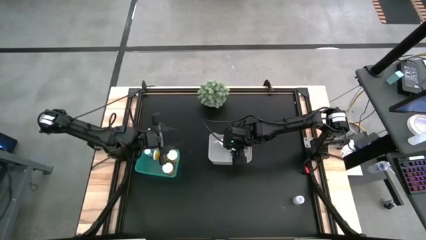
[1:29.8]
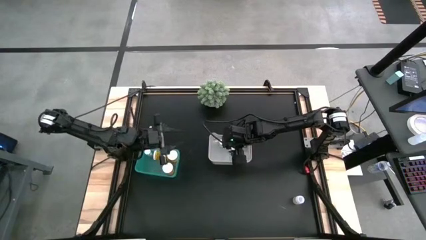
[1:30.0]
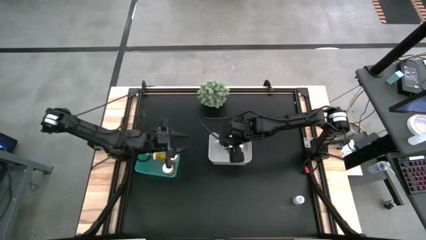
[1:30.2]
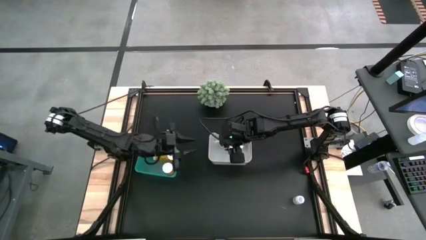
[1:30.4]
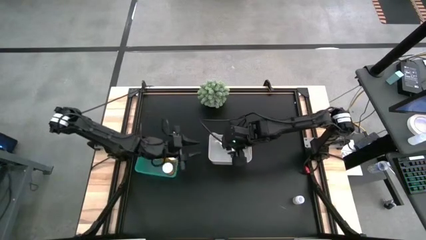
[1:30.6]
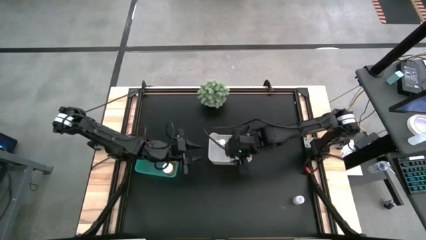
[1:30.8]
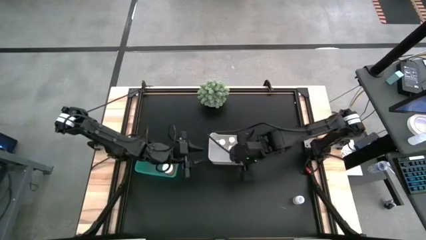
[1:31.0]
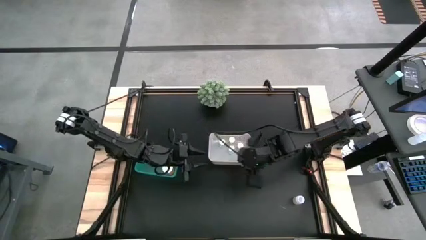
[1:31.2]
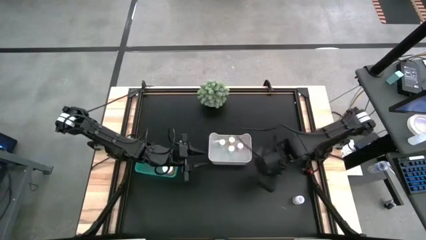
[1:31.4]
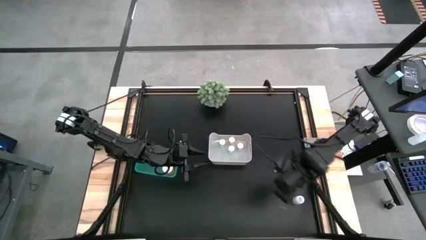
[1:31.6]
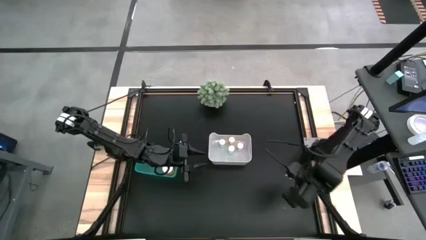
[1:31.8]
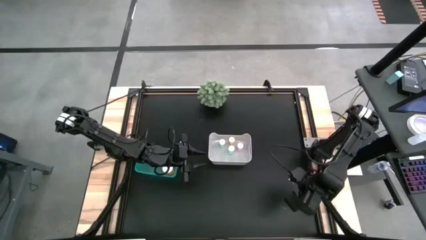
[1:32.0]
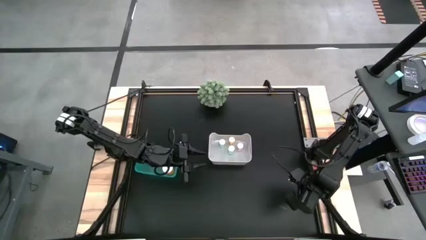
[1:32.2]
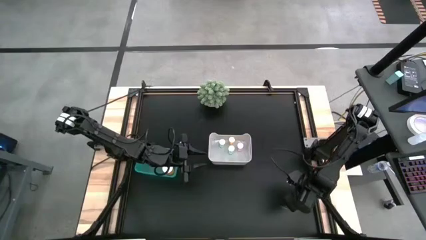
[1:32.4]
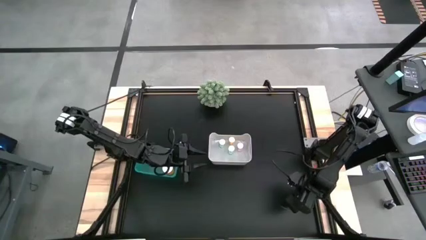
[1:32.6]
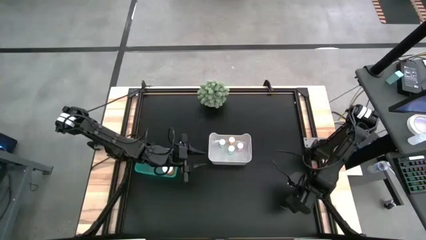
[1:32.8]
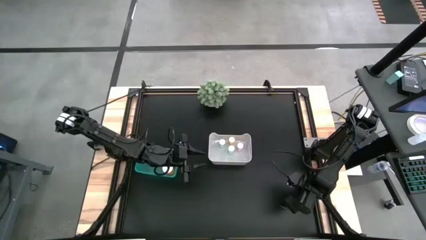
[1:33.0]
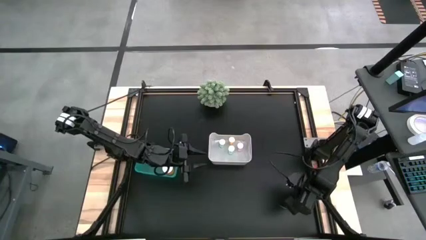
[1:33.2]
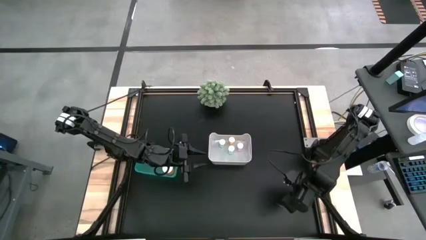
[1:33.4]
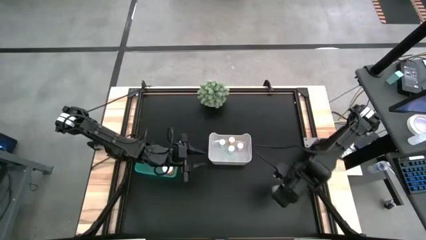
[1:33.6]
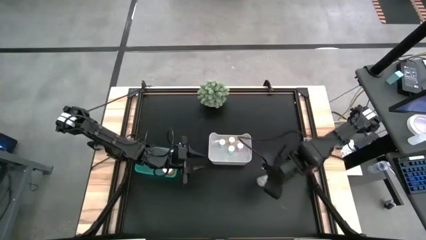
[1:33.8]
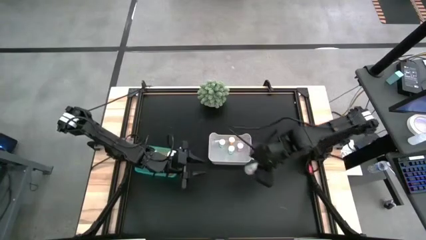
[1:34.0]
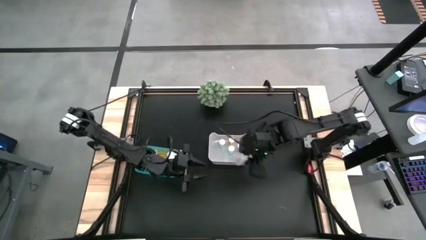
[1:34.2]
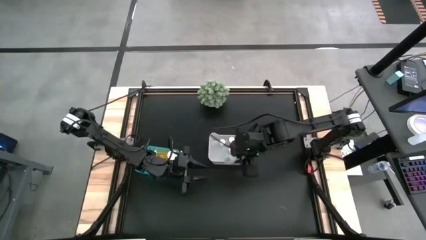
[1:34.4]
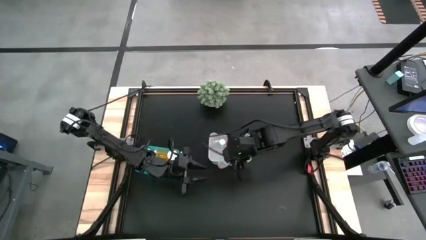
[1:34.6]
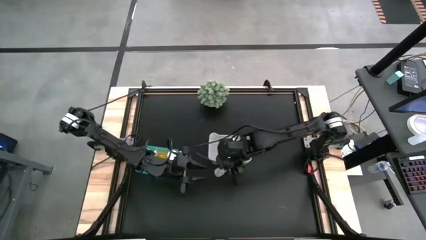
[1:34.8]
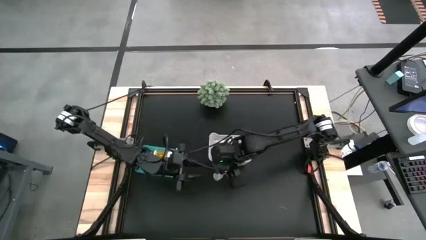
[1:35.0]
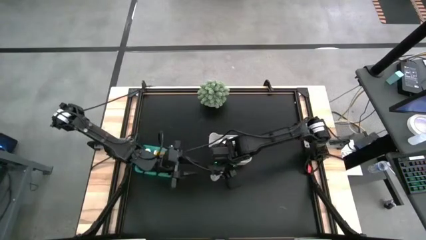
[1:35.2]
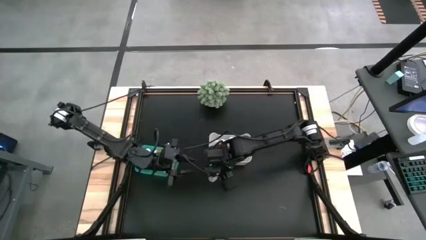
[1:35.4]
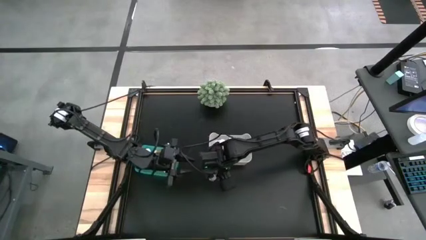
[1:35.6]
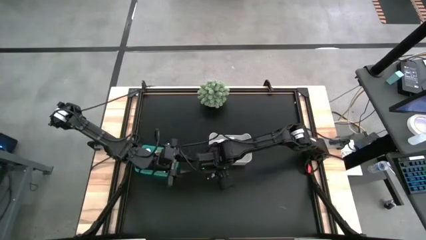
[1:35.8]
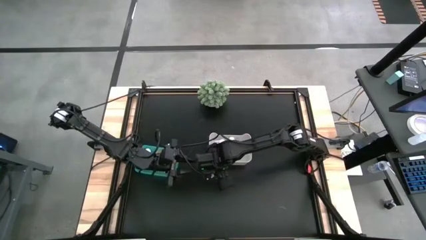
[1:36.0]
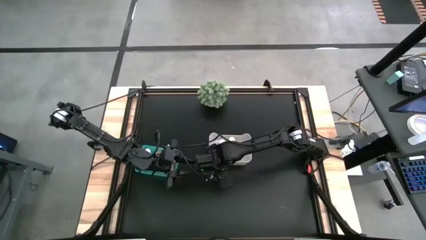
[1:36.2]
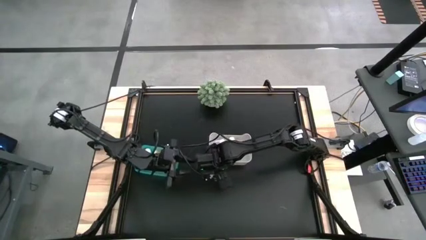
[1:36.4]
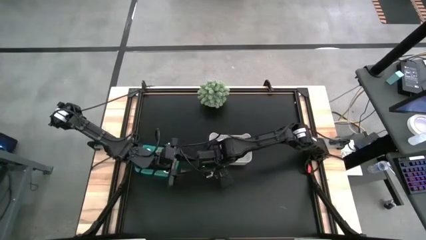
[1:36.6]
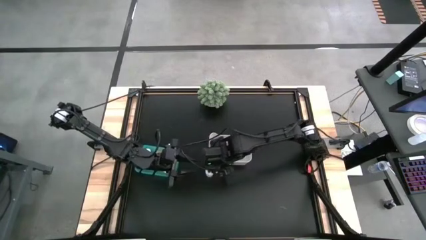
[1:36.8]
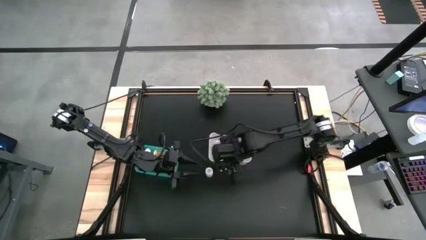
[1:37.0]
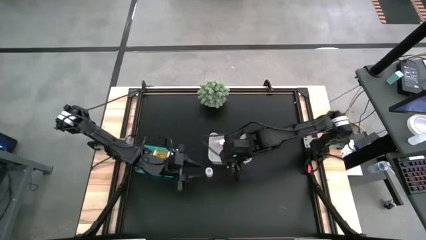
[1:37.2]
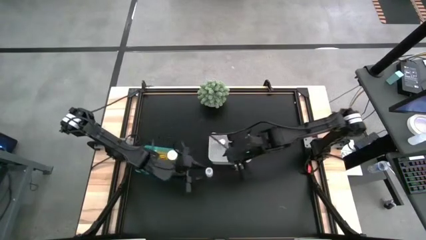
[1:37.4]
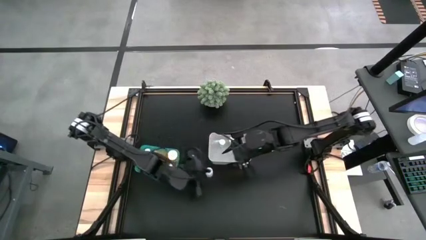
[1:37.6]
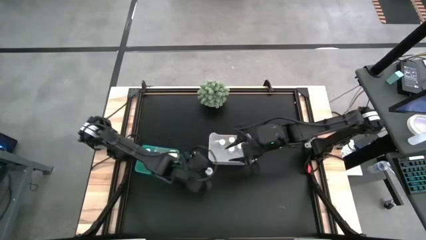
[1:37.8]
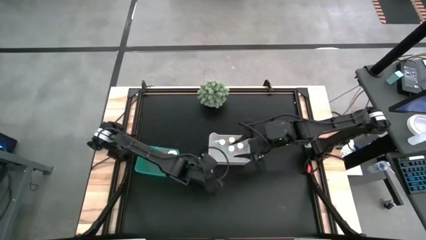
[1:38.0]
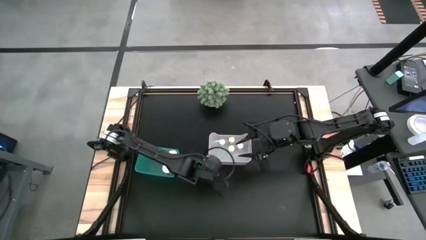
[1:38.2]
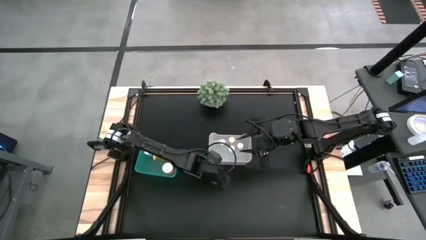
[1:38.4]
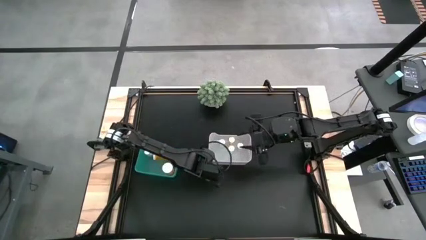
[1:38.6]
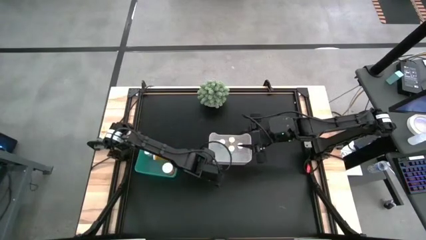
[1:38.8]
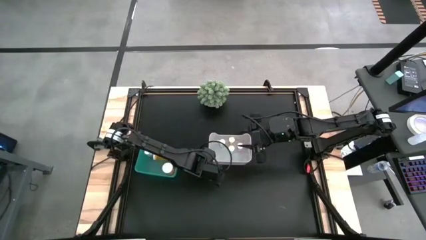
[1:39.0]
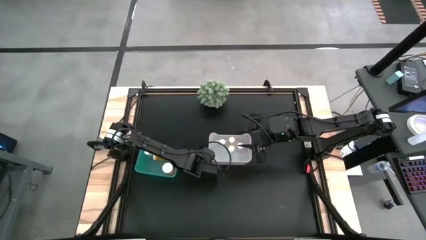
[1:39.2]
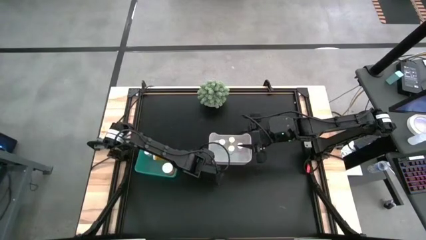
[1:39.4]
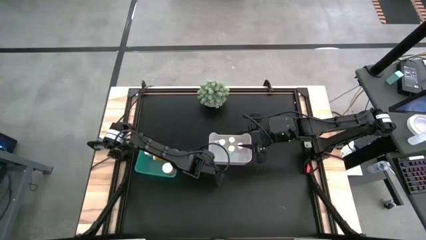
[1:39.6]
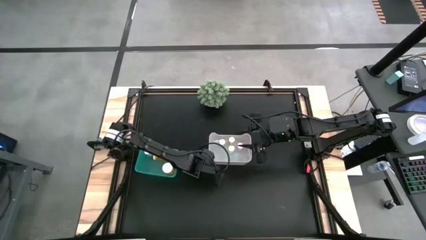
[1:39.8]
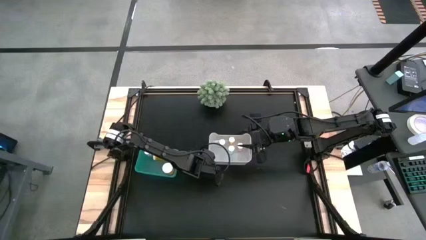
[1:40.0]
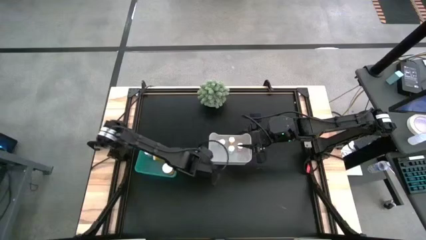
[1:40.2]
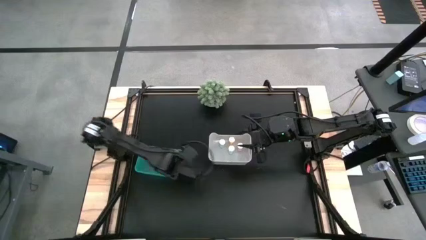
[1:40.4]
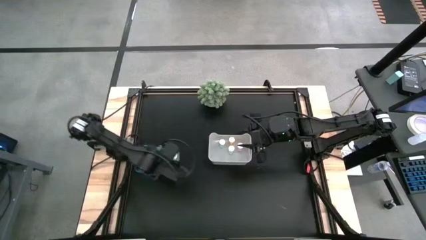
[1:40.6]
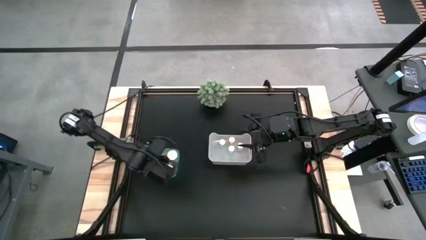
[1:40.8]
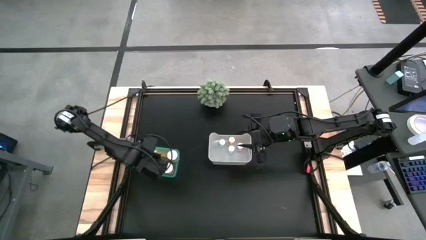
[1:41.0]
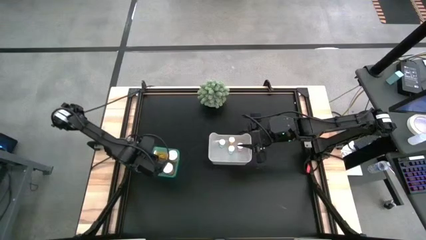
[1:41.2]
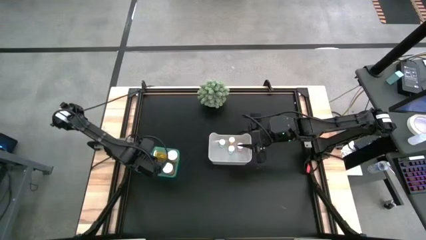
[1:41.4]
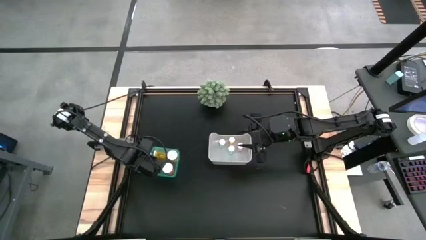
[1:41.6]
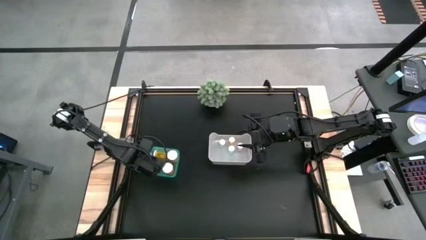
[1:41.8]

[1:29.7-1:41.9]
Task: Pick and place medicine bottles into bin by pill shape (circle, oval)
Put the white capsule bottle into the blue bin

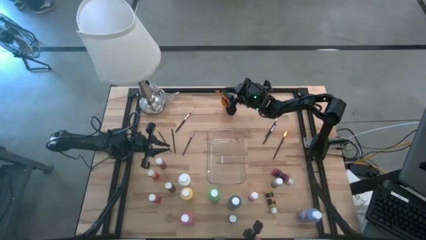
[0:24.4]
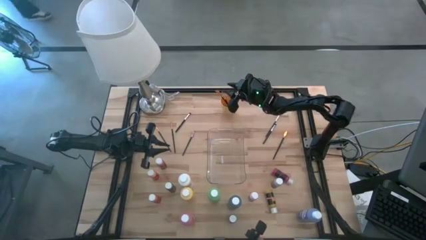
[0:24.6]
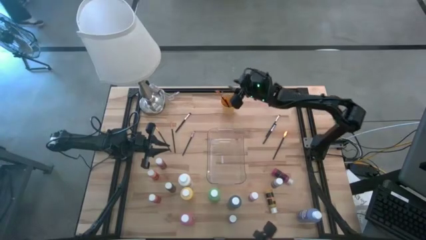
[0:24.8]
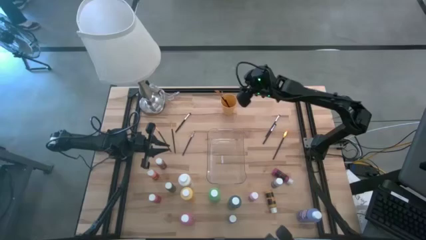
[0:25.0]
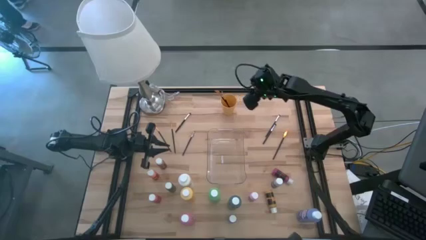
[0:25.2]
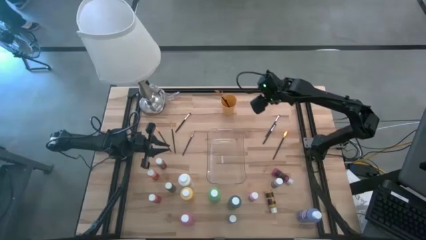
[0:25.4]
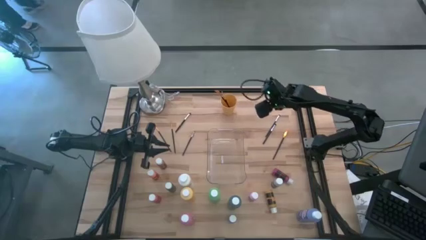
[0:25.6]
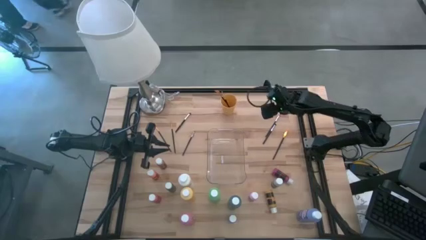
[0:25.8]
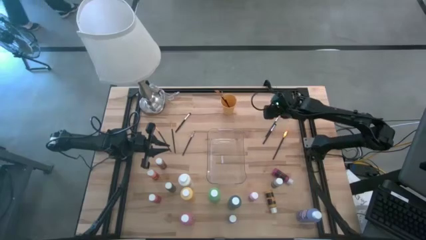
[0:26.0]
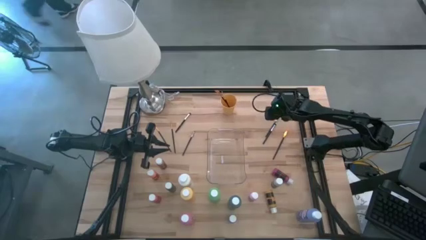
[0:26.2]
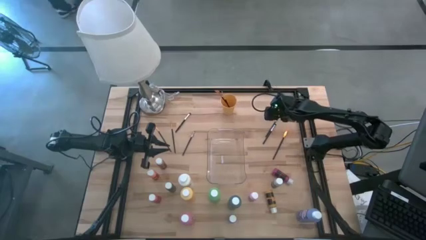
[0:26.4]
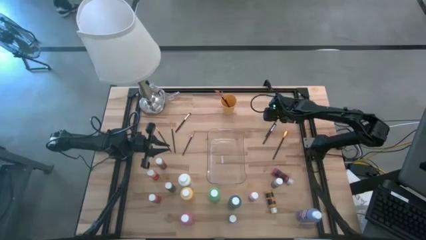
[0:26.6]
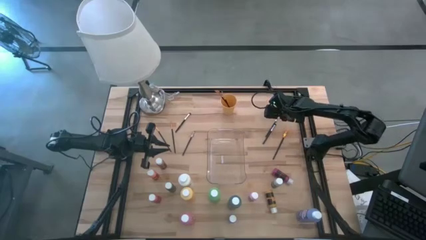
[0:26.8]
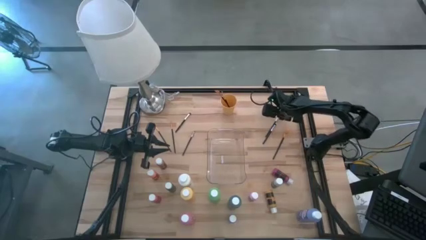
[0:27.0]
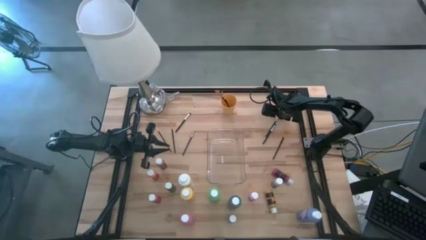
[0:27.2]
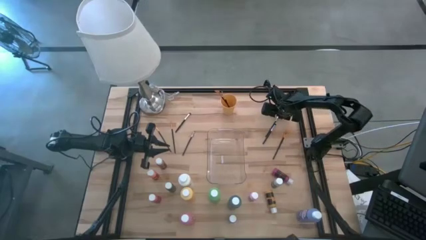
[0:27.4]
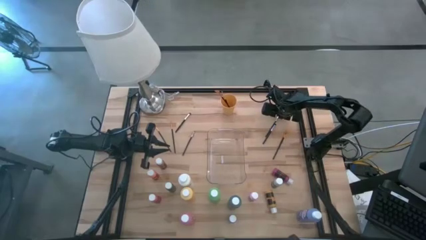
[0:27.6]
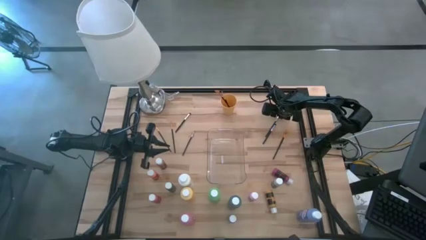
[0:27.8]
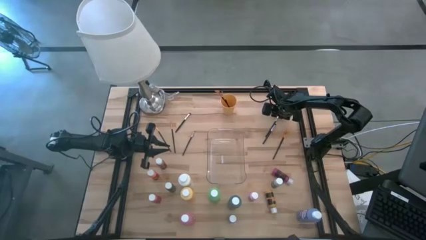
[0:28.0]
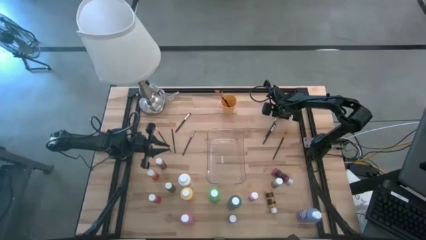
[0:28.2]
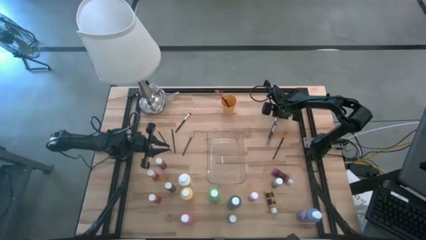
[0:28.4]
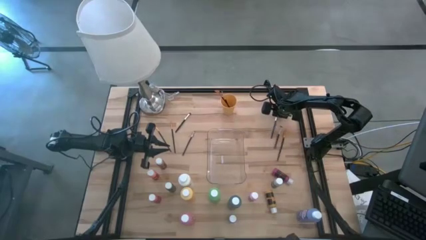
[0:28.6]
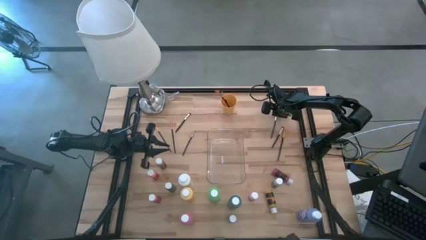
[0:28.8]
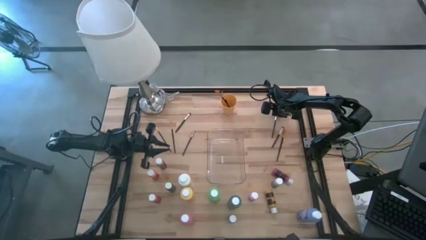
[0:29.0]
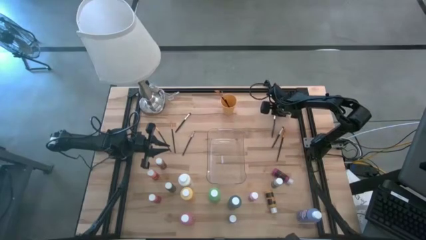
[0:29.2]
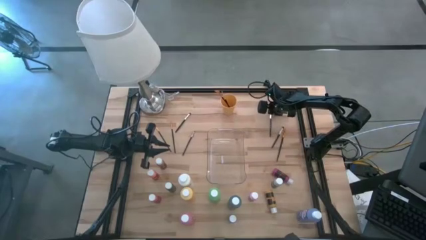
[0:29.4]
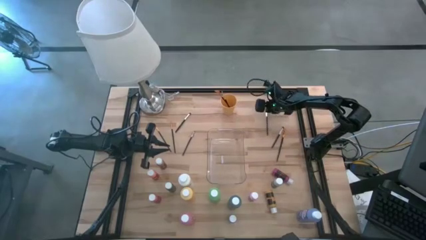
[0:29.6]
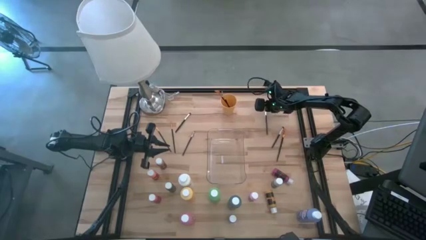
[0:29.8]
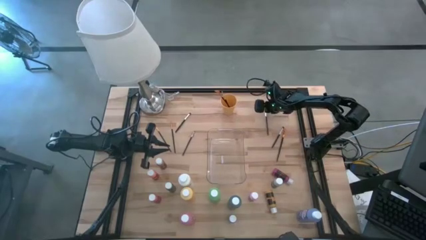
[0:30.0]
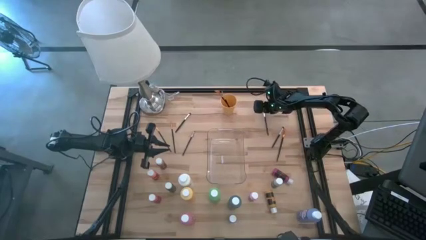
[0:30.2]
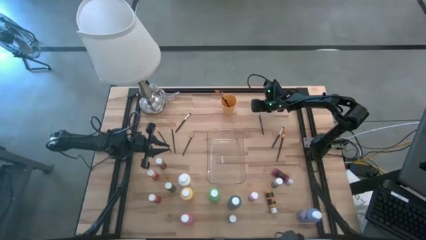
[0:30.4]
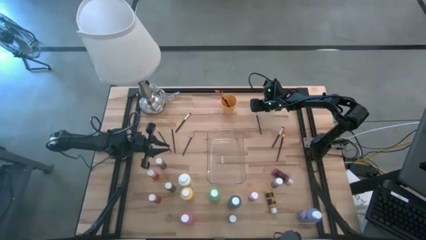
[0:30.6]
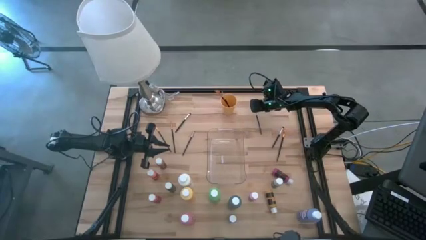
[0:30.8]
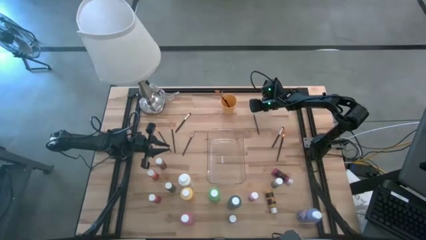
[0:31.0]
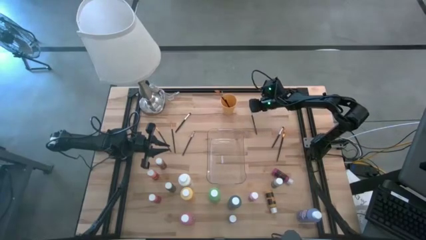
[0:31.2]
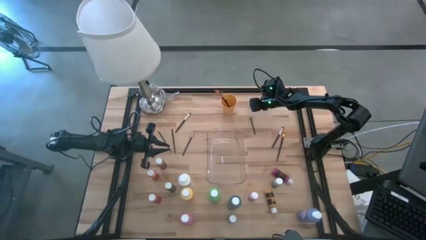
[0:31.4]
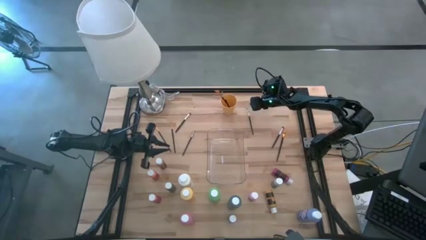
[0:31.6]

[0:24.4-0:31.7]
Task: Pick & Place Paint Supplies
Put the silver paint brush into the yellow cup
